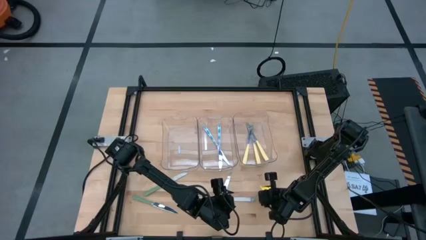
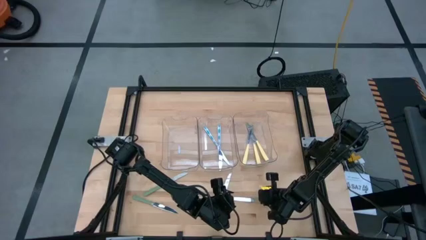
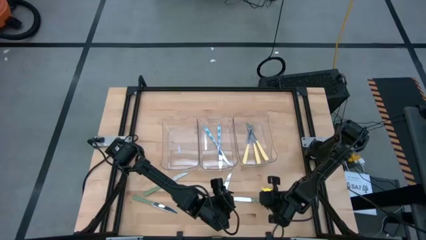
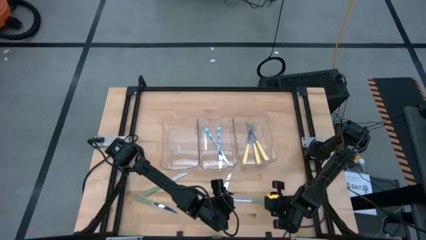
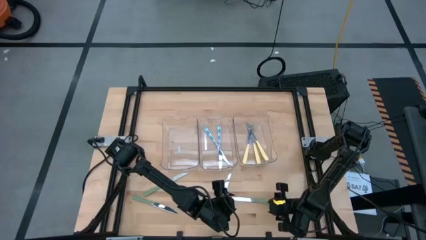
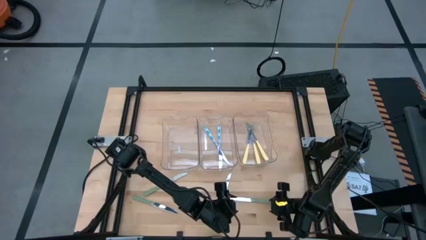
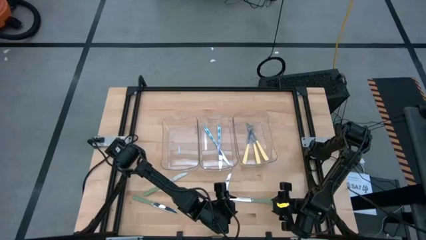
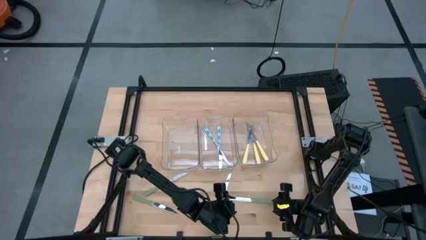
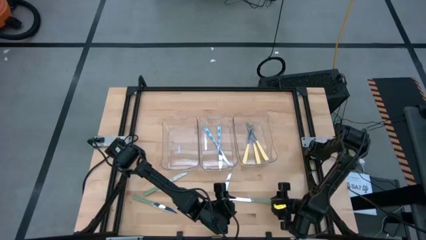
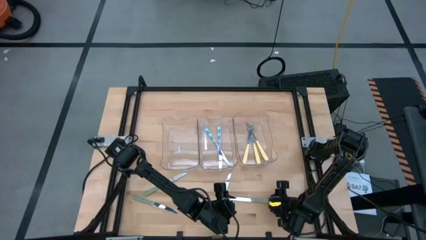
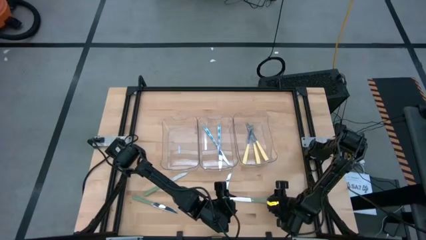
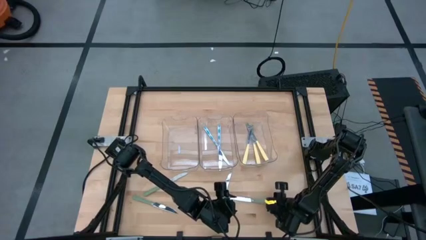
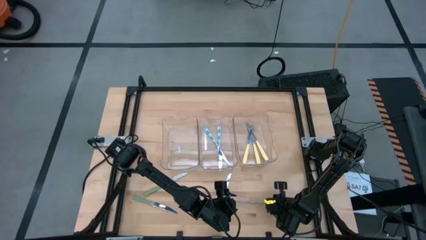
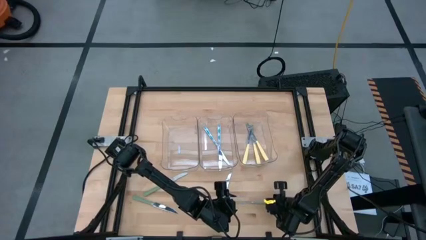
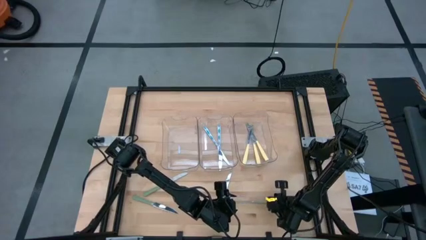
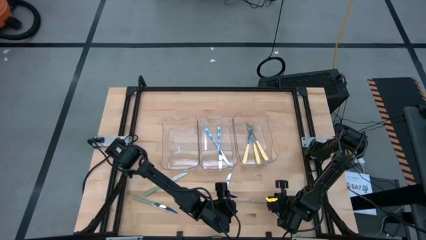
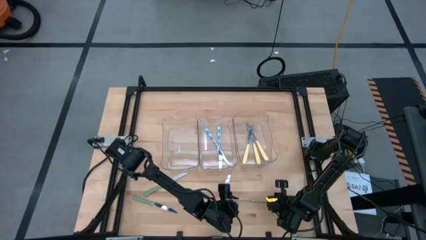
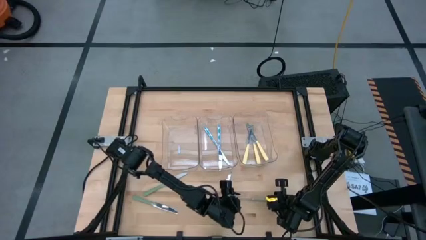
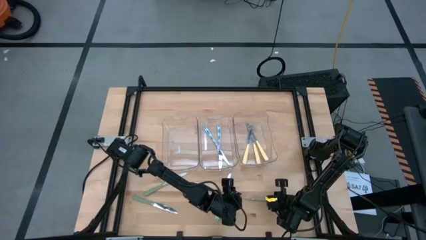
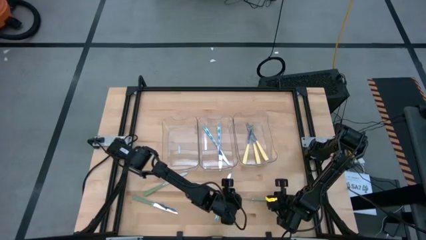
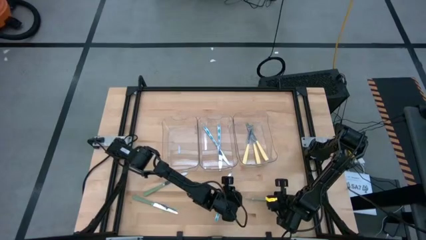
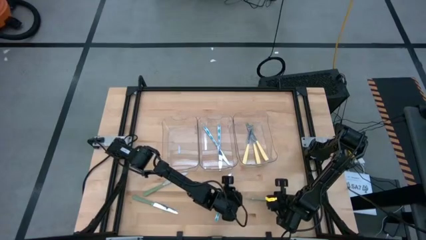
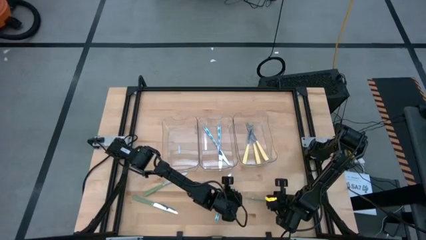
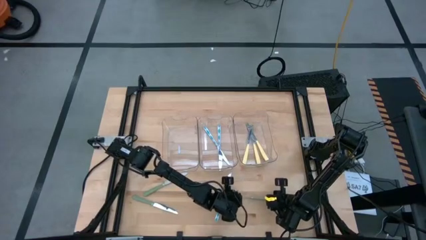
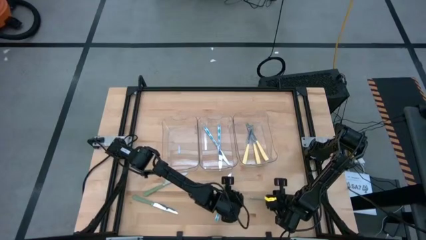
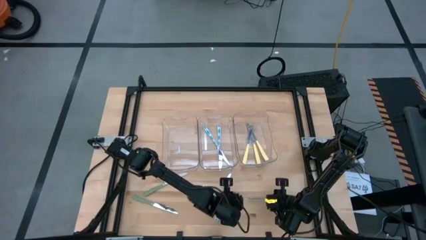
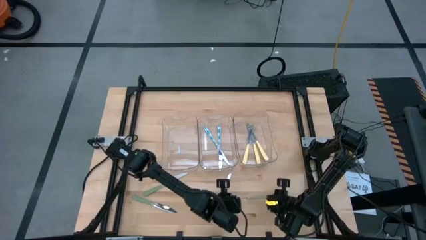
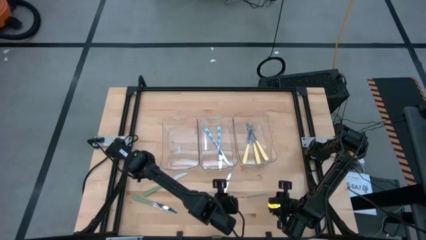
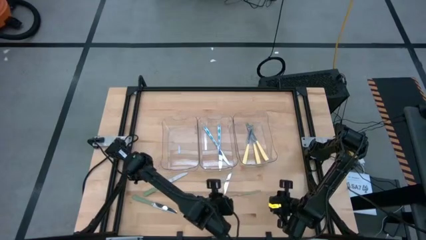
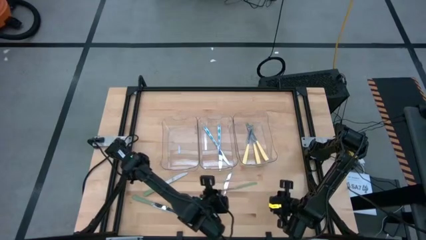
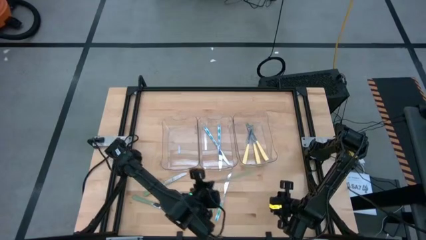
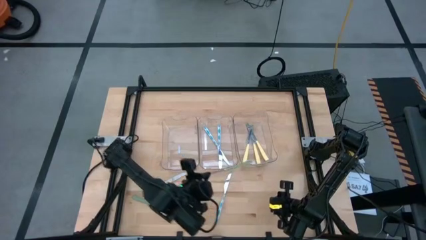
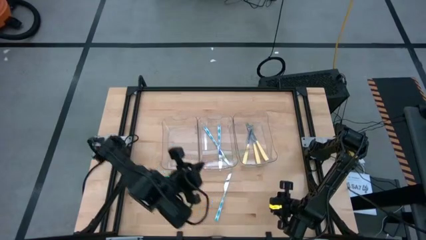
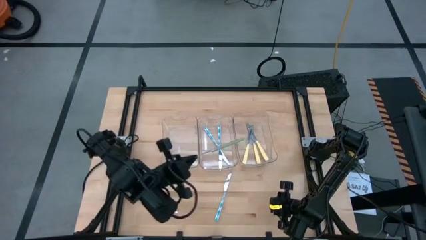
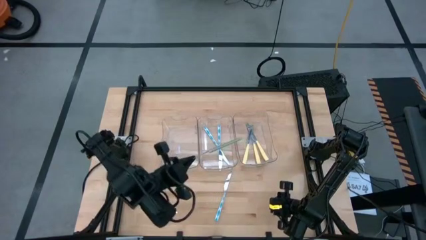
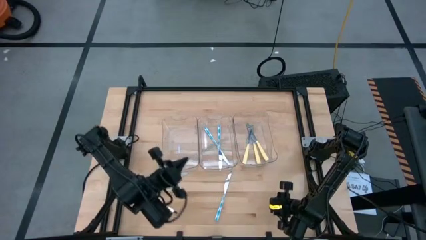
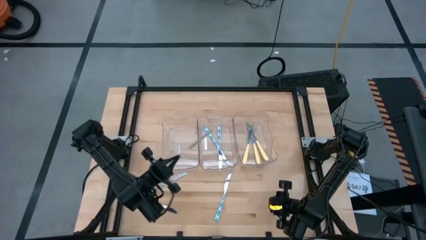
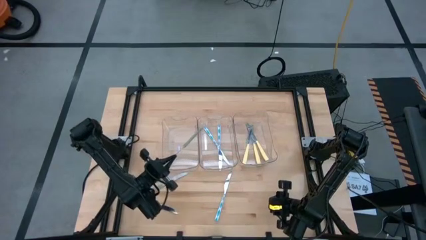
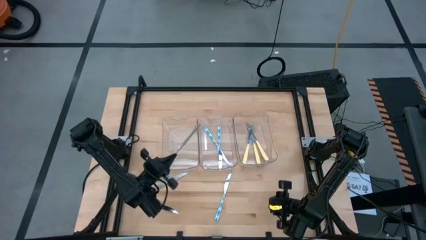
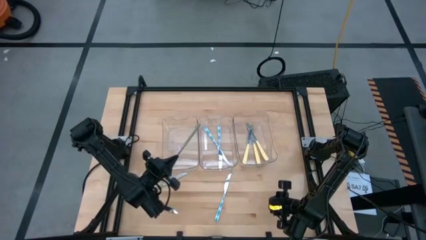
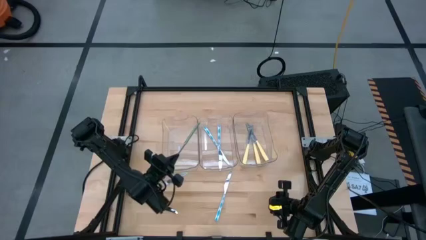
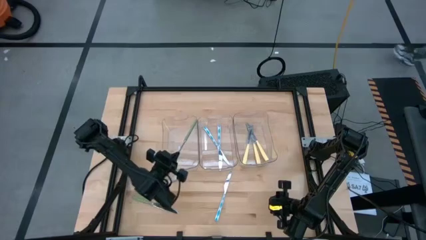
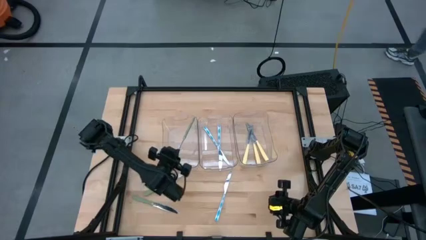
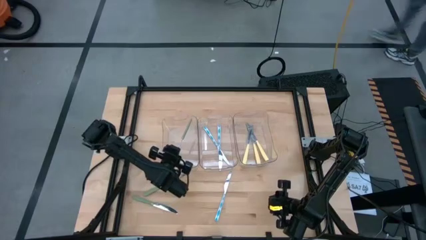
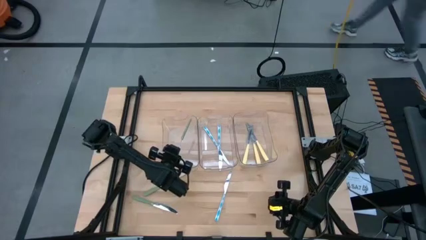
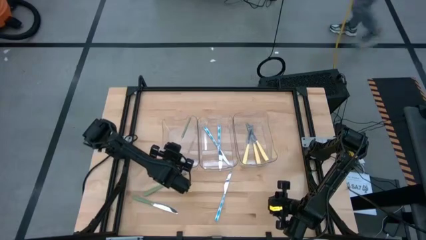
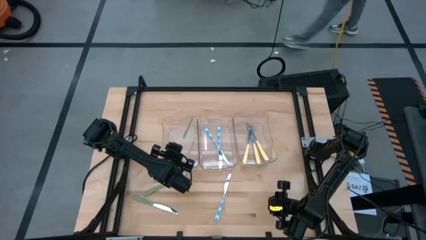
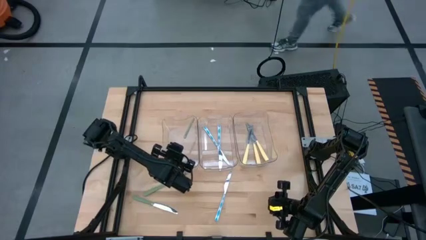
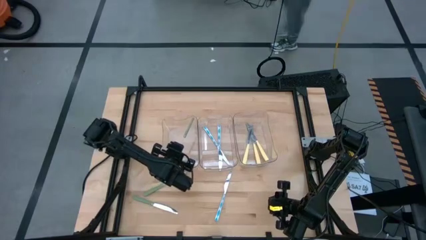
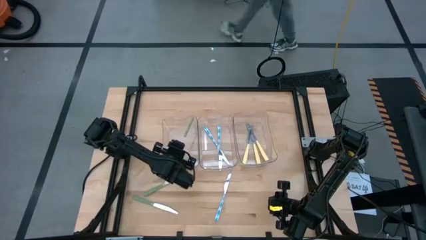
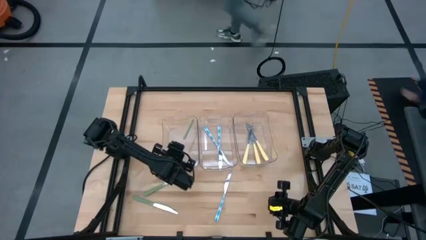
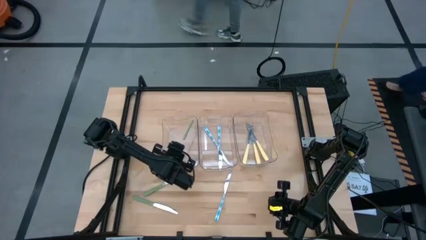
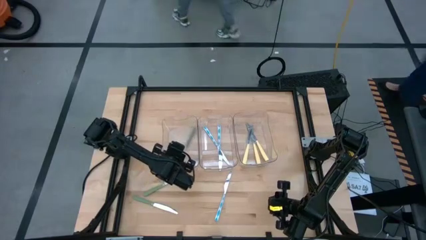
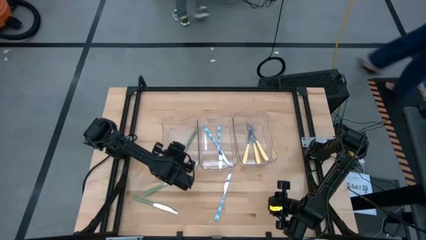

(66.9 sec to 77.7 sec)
Task: Sort silverware by color (type)
Put the middle right green knife into the left transparent bin

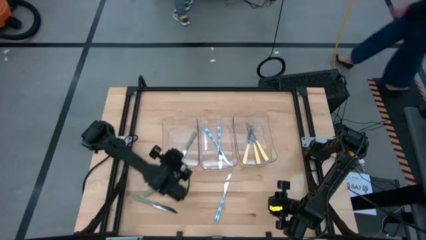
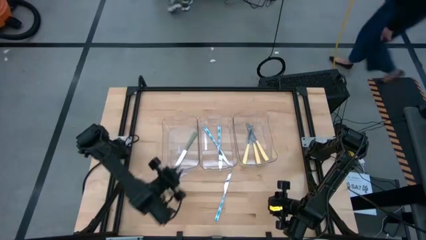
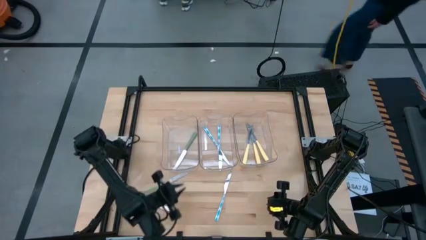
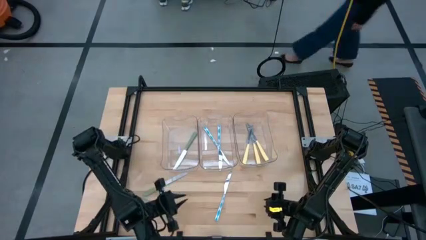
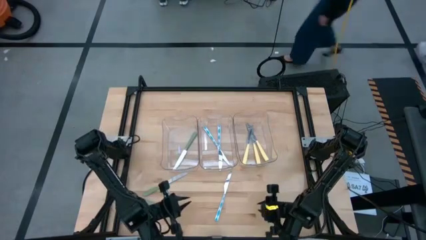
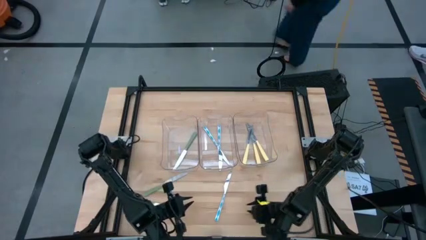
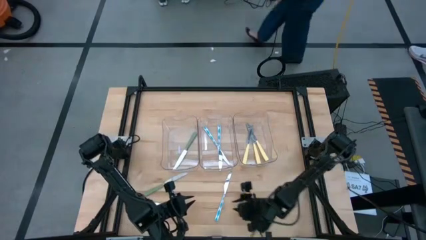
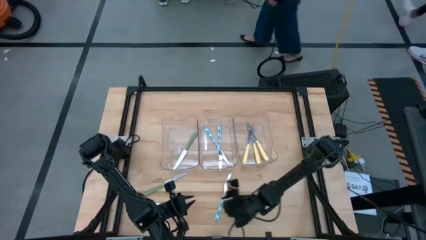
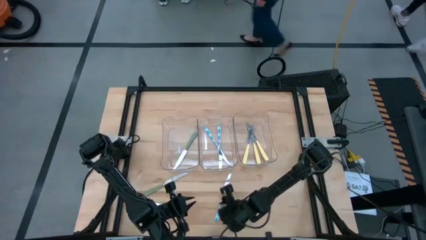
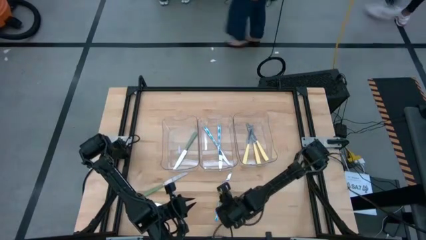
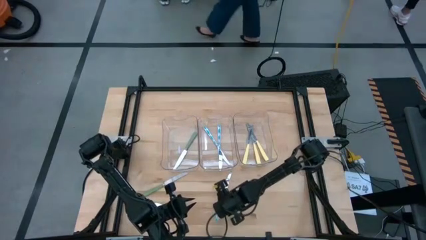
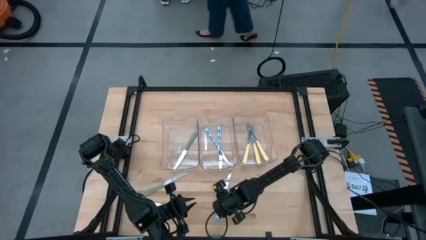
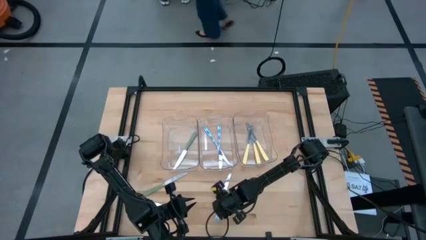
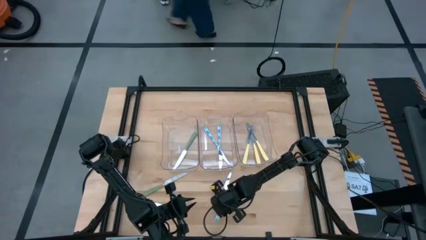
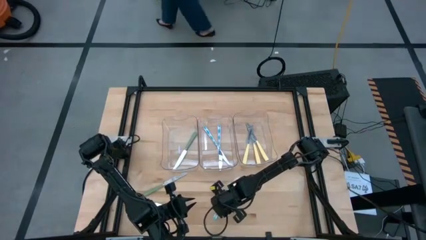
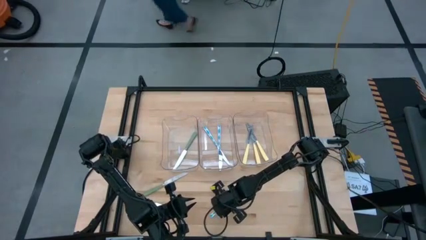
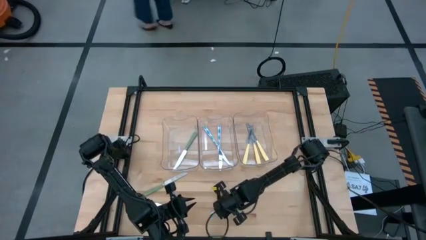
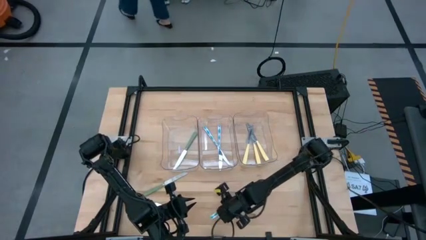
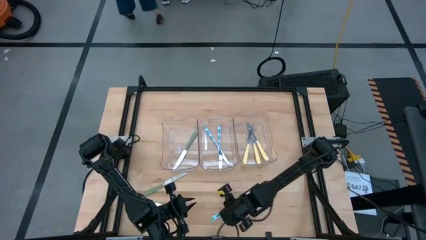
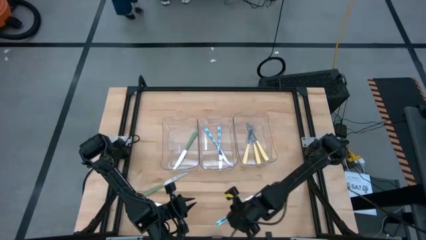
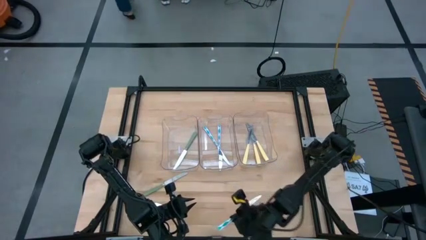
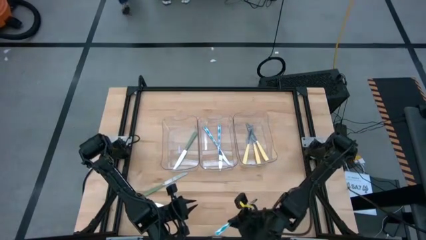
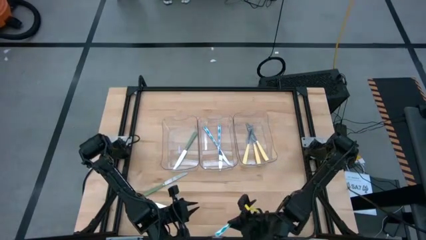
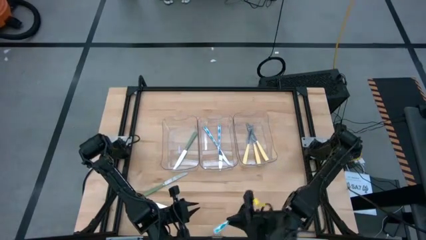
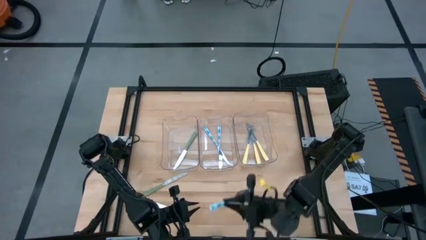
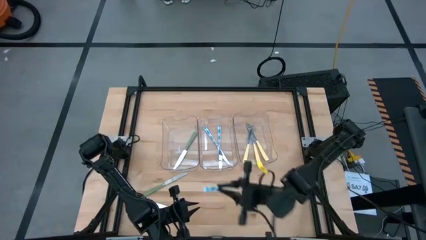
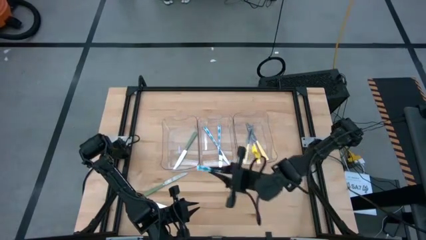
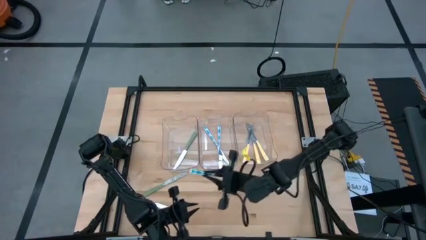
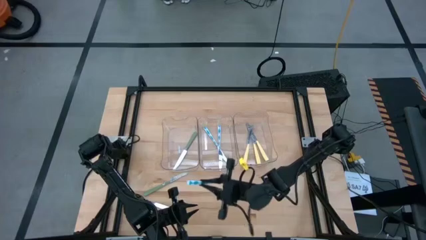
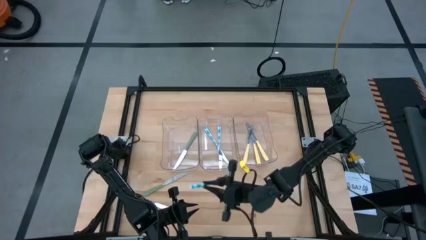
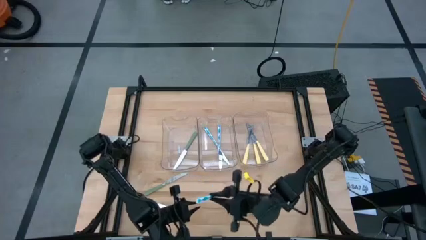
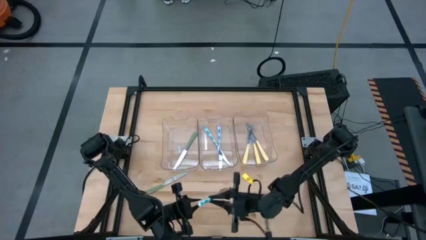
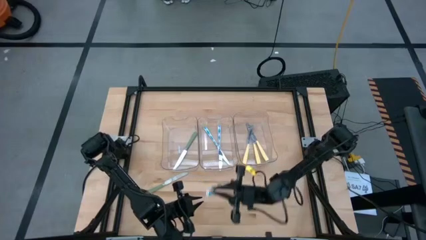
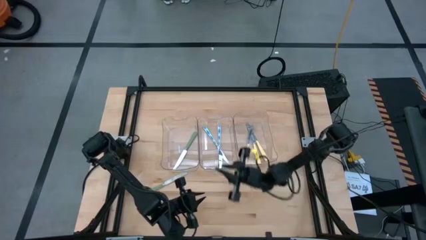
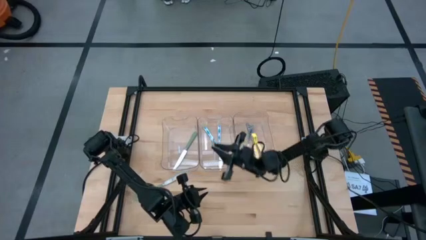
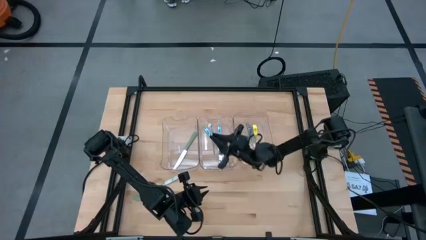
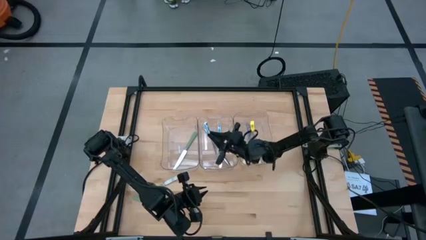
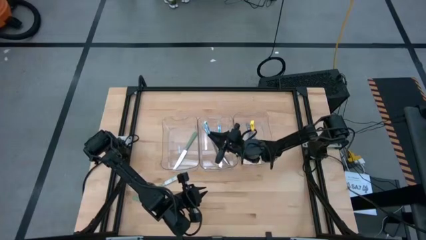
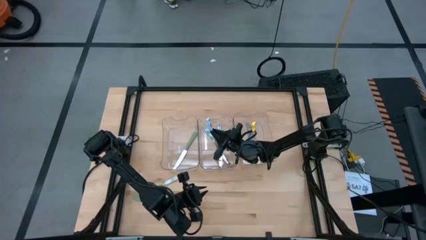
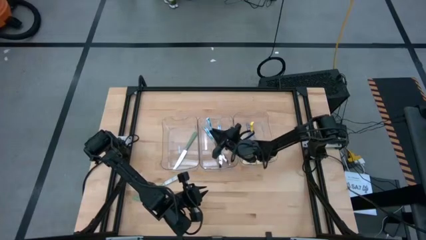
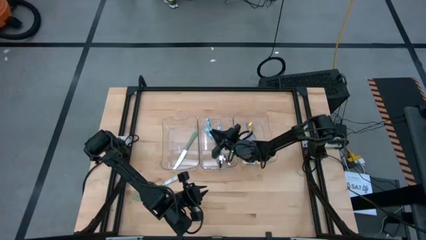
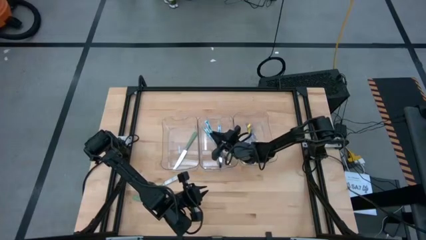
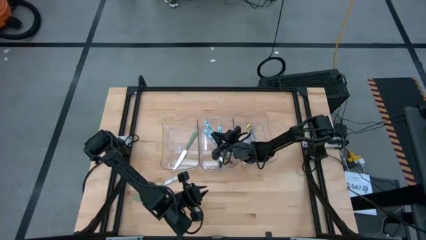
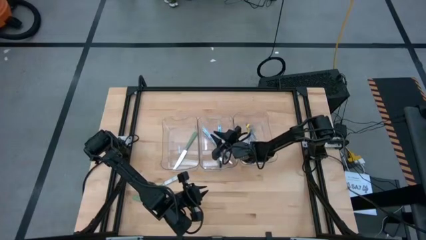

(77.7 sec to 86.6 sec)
Put the blue knife into the middle transparent bin
